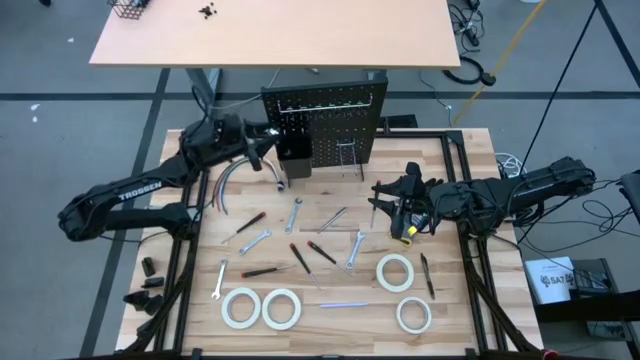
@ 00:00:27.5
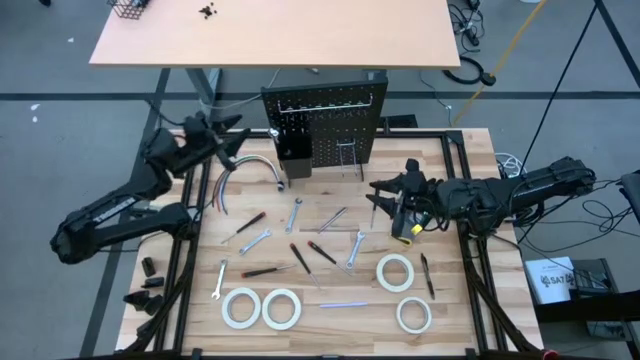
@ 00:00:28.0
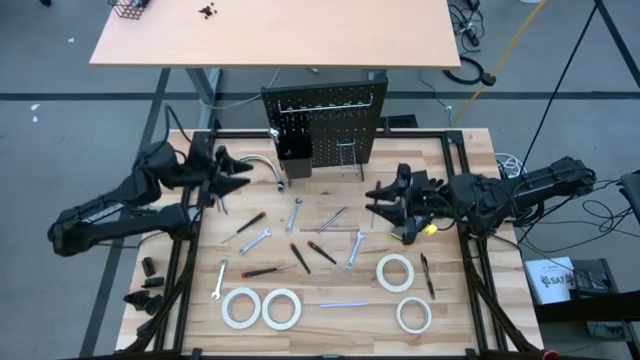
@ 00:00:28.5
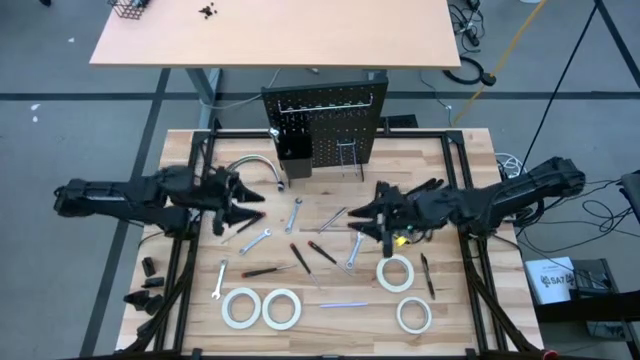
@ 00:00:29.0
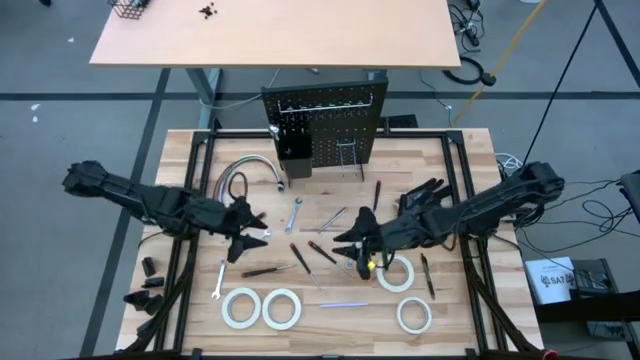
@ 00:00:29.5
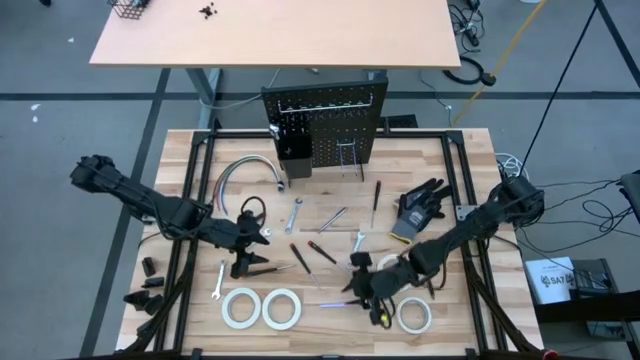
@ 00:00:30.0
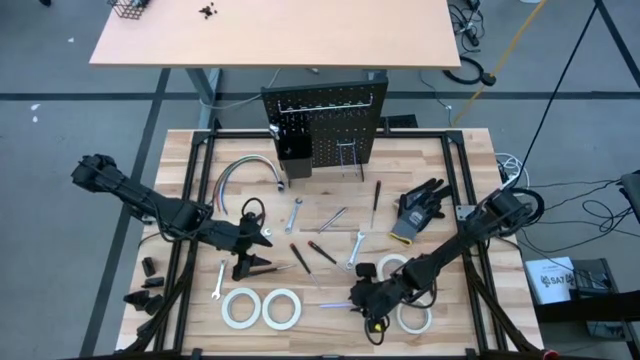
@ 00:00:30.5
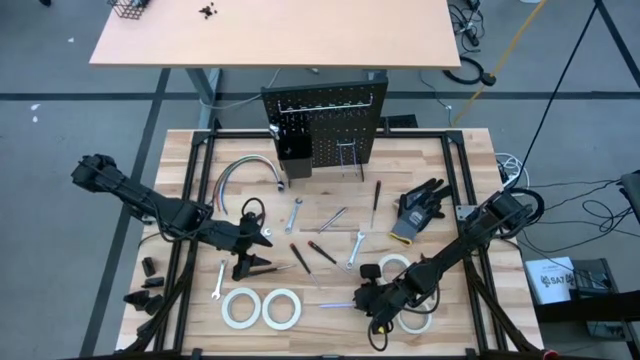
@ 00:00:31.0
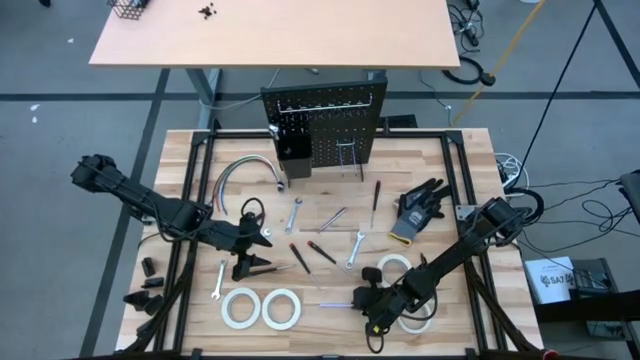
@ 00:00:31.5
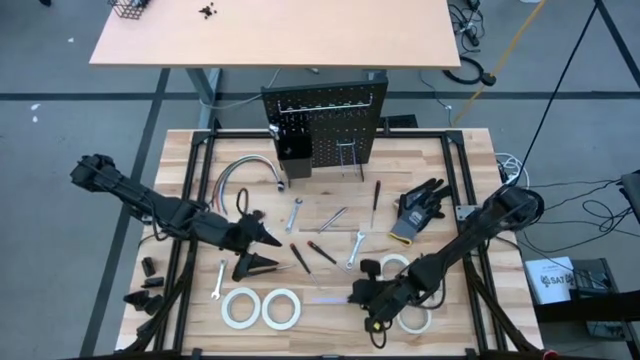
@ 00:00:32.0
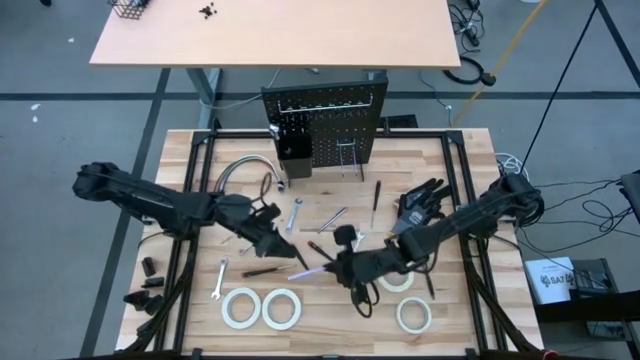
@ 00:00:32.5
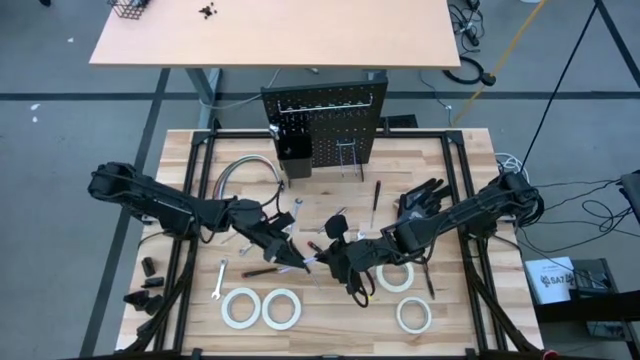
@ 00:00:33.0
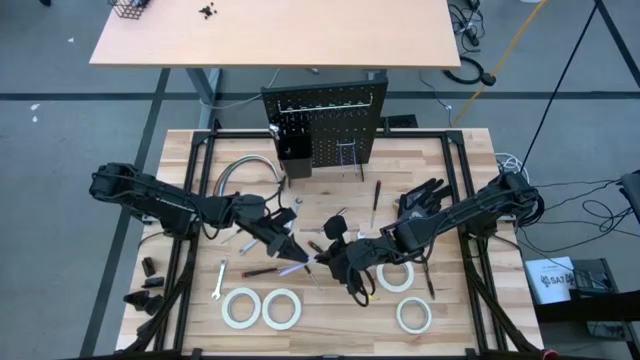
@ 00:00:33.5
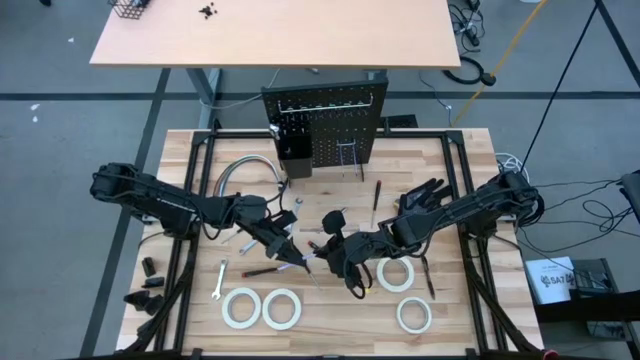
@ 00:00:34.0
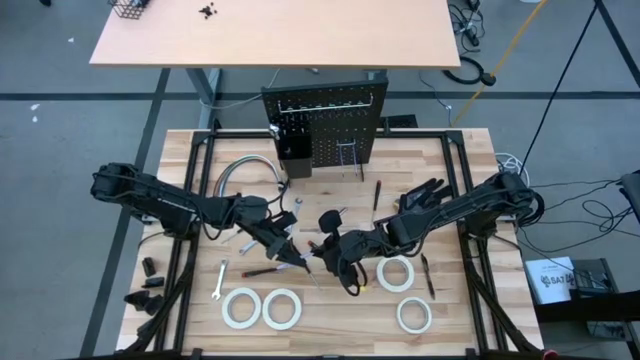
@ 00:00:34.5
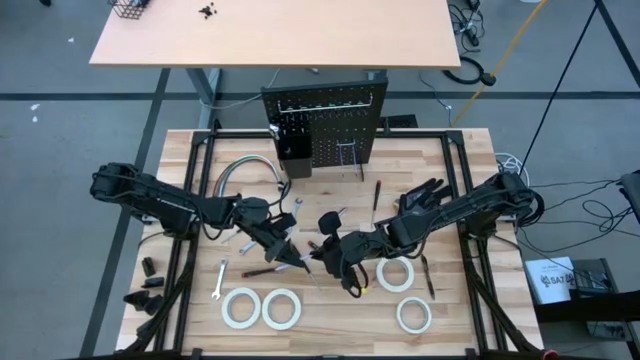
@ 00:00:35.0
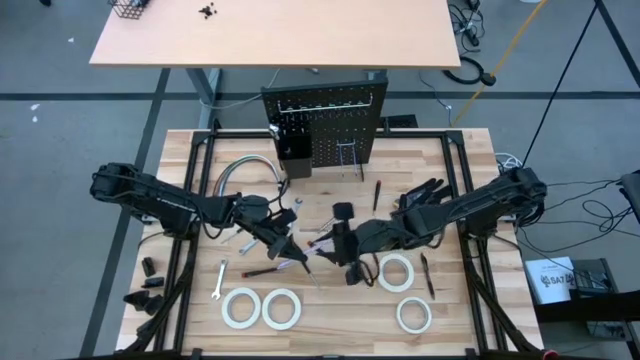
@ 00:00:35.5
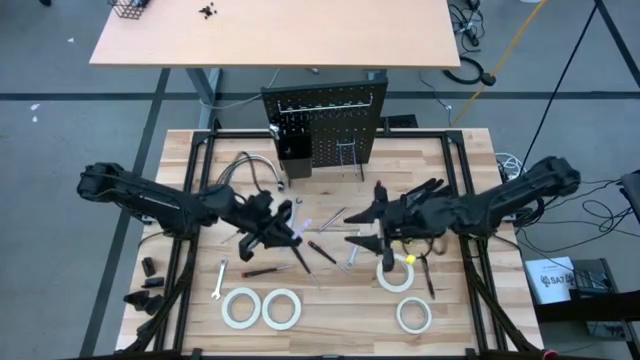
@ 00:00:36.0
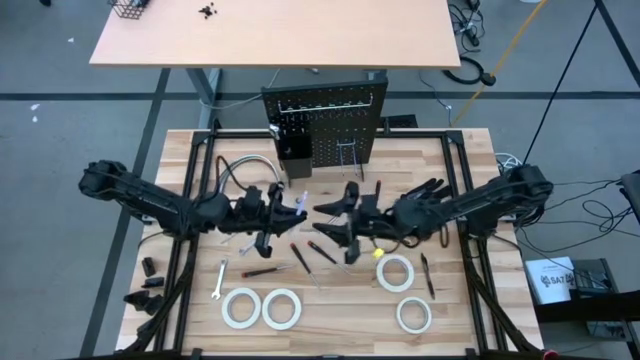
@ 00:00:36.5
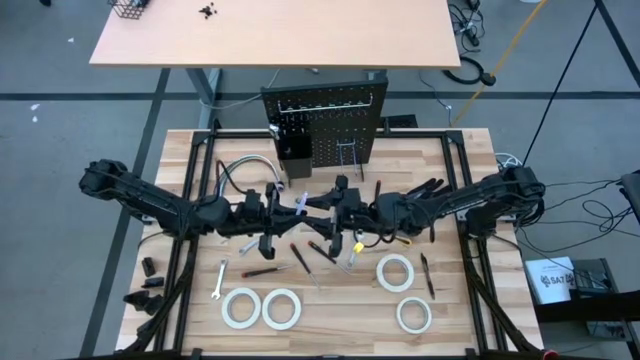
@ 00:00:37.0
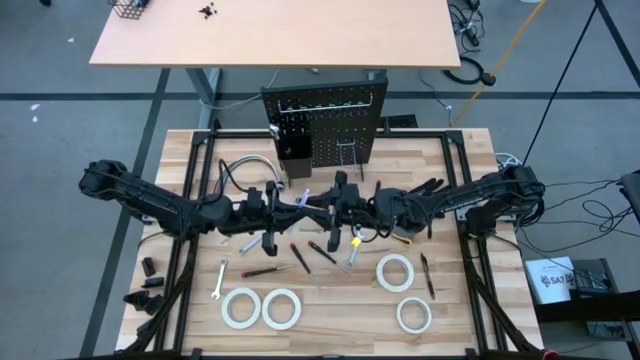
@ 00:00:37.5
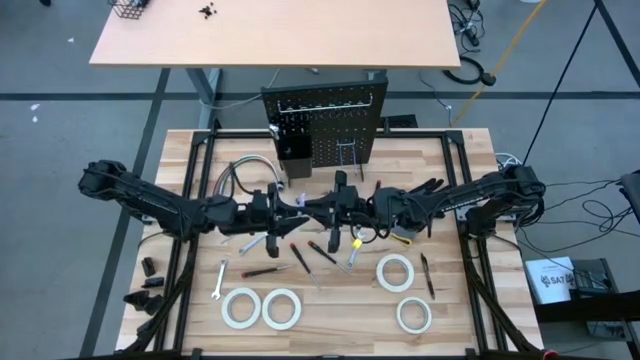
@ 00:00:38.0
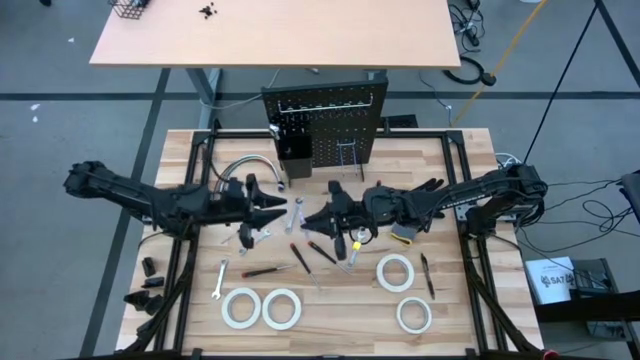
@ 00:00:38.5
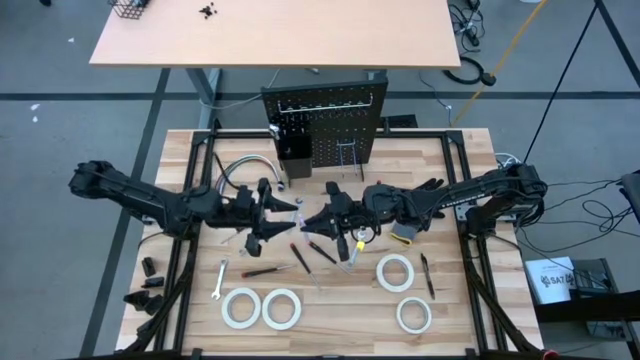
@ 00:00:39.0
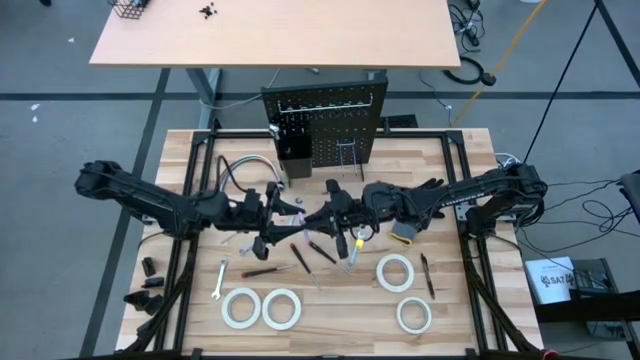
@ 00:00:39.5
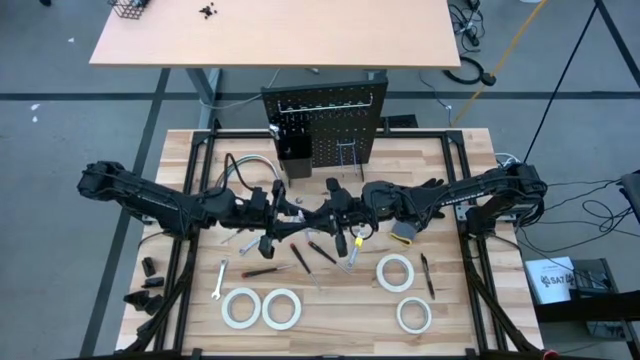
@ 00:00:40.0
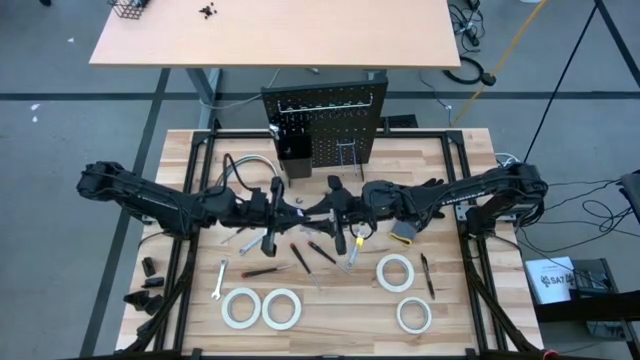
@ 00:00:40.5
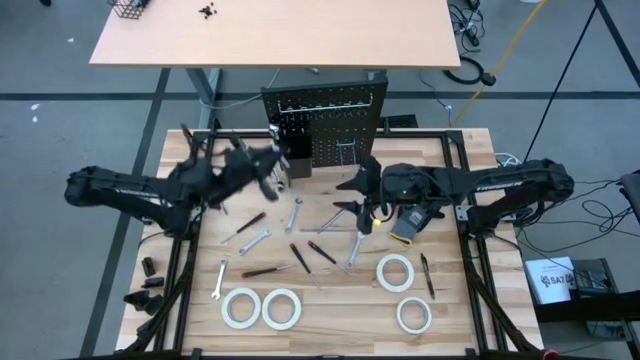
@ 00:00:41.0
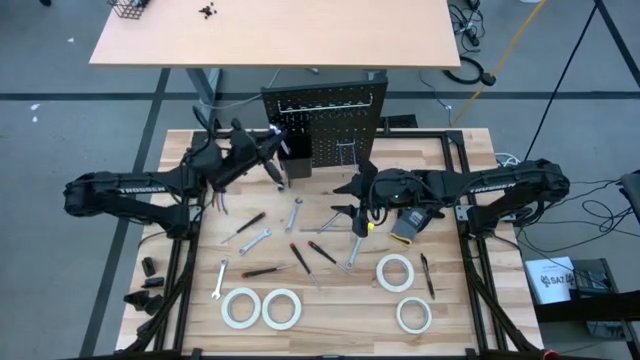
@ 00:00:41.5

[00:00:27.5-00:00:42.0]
Task: Hang tools onto peg board
Put the violet pen into the peg board

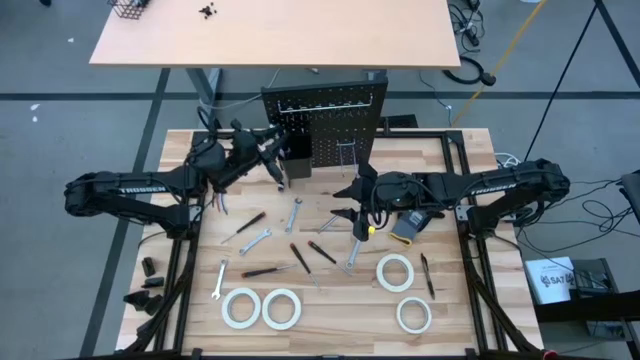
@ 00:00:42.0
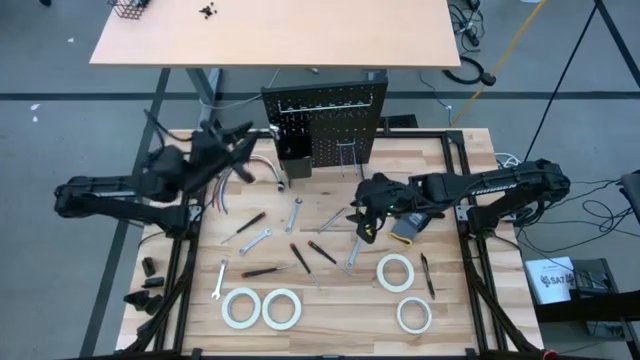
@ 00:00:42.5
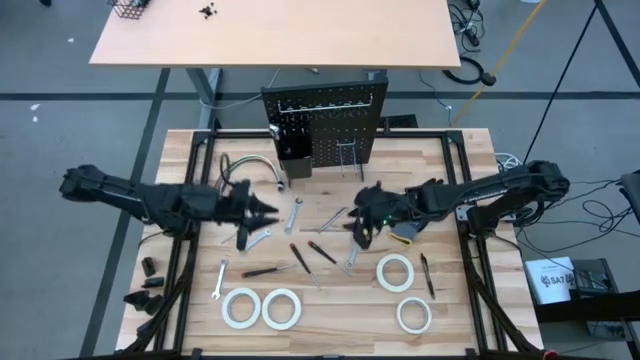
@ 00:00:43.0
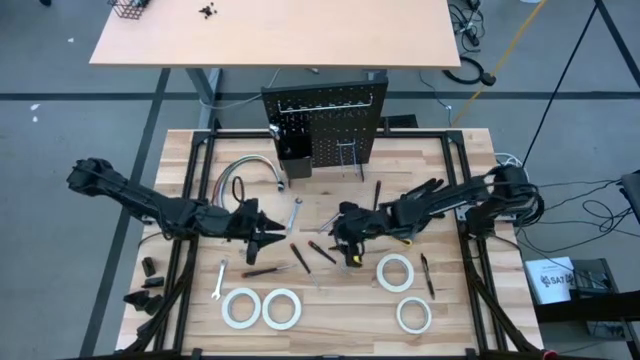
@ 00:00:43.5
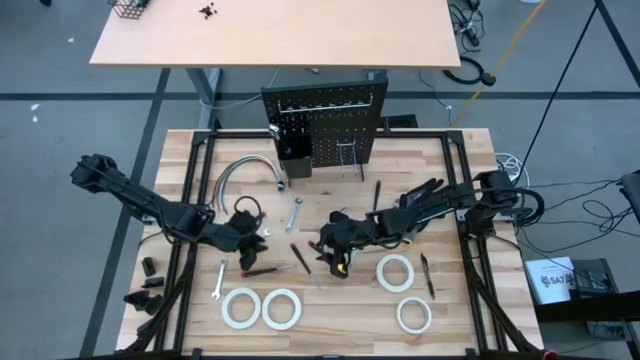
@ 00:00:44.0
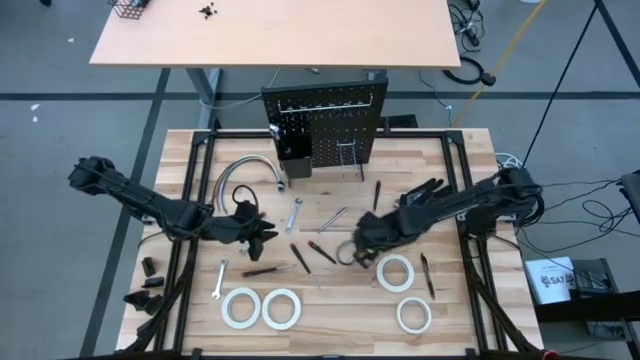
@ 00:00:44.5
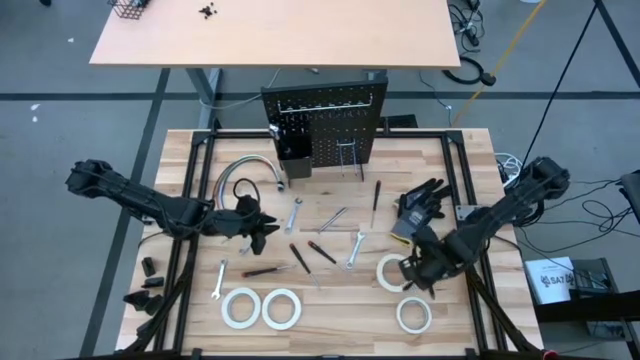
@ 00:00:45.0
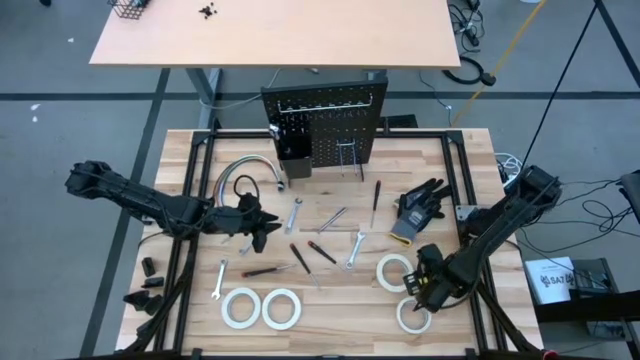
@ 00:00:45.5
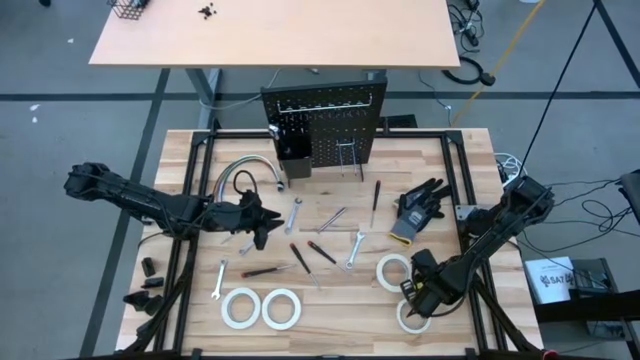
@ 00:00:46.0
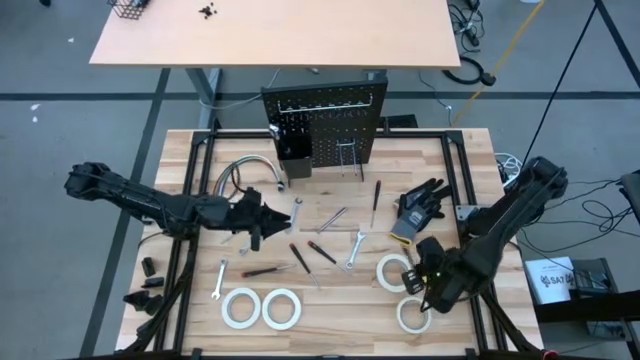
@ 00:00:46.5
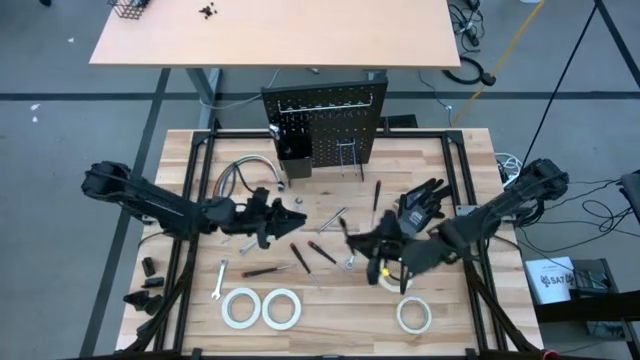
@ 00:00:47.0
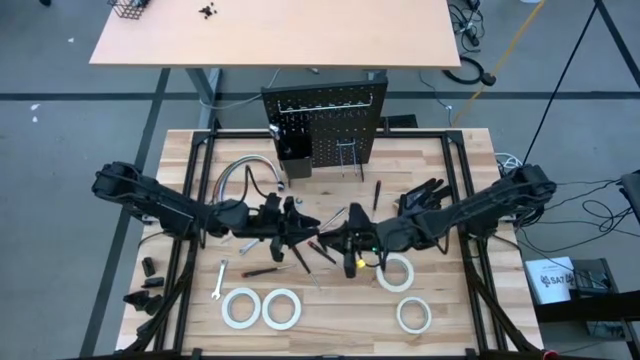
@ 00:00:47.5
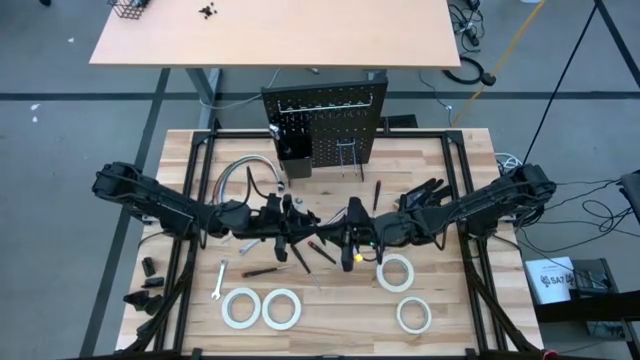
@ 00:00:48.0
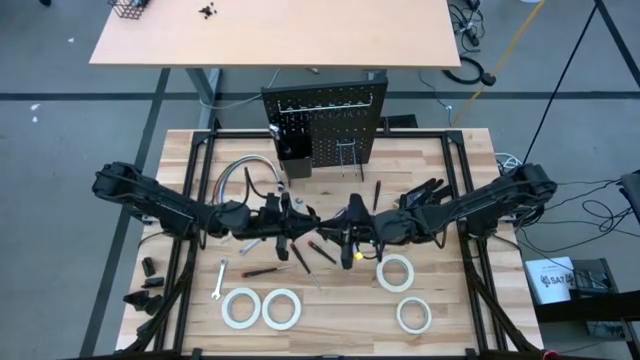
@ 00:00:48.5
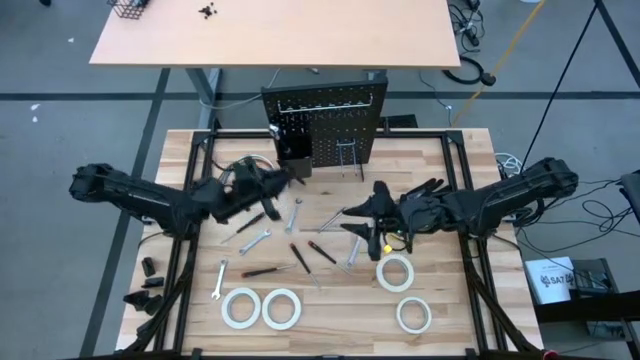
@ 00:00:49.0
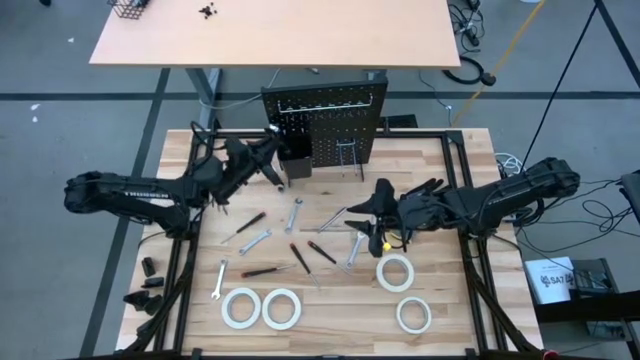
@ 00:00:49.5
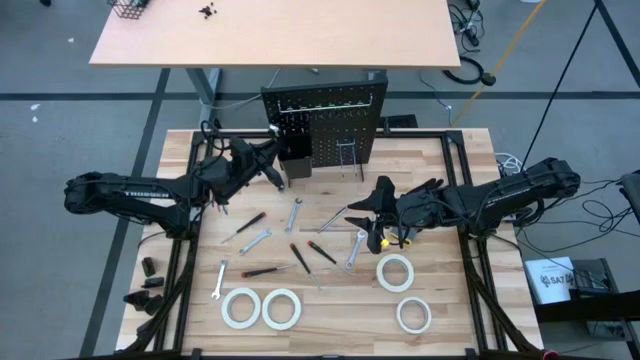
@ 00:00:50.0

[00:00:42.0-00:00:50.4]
Put the black pen into the peg board
